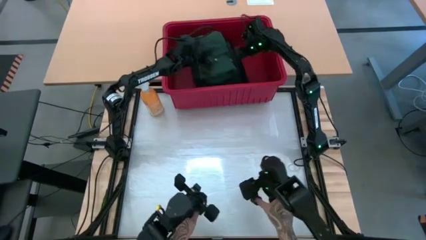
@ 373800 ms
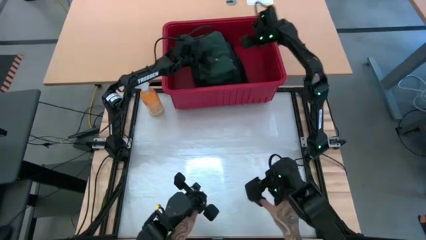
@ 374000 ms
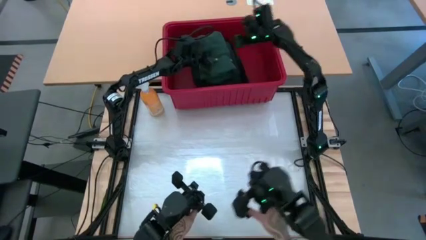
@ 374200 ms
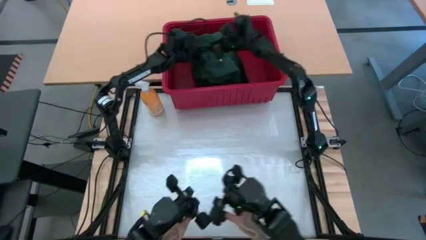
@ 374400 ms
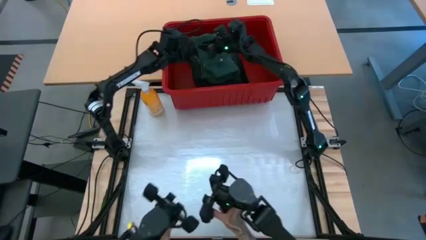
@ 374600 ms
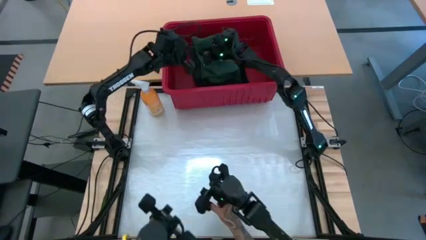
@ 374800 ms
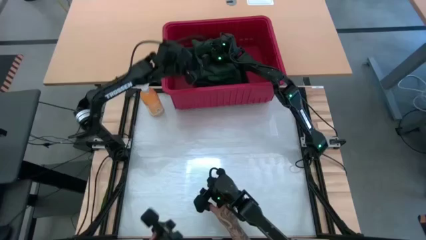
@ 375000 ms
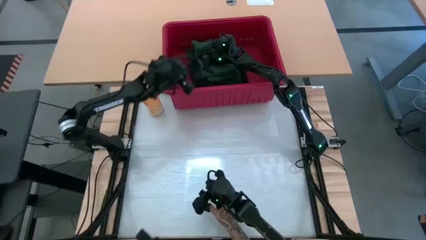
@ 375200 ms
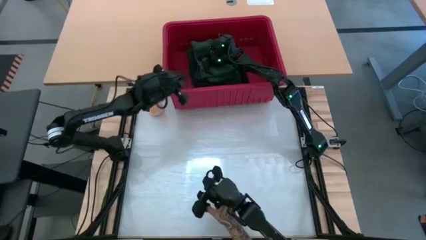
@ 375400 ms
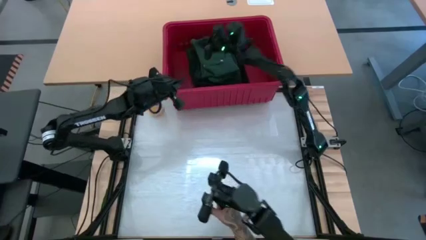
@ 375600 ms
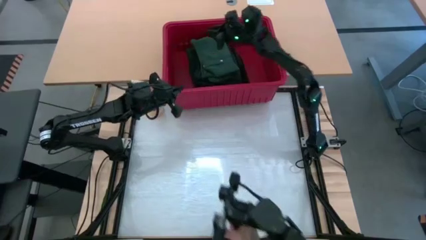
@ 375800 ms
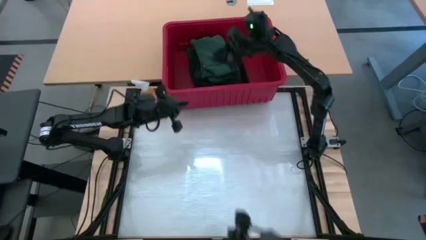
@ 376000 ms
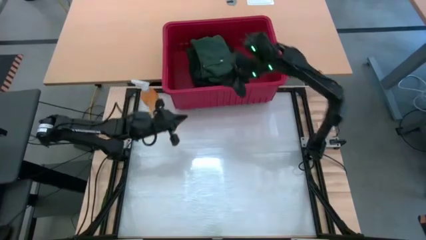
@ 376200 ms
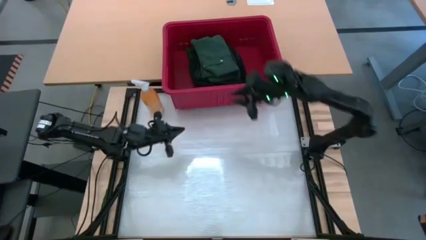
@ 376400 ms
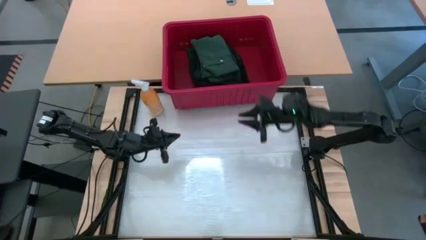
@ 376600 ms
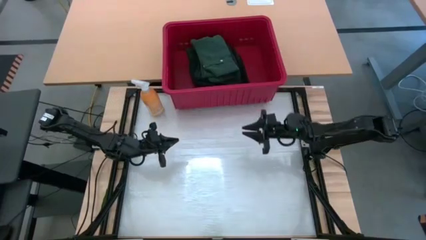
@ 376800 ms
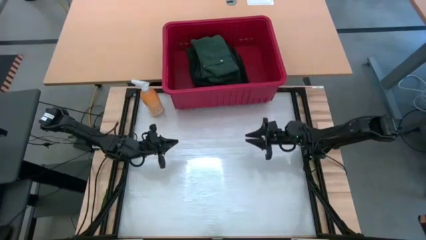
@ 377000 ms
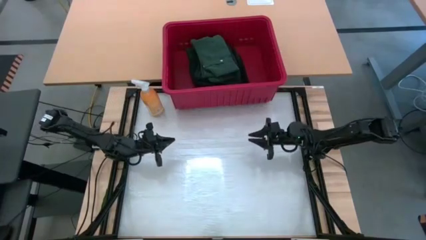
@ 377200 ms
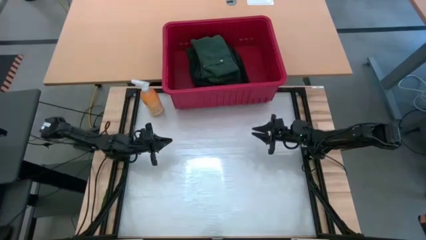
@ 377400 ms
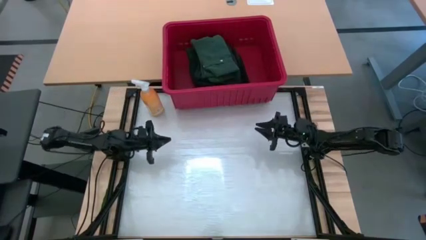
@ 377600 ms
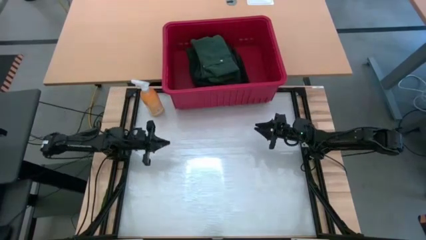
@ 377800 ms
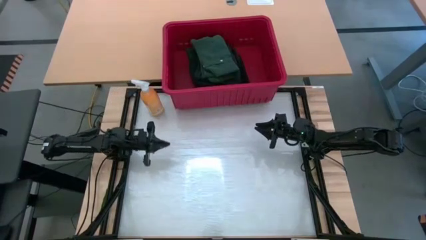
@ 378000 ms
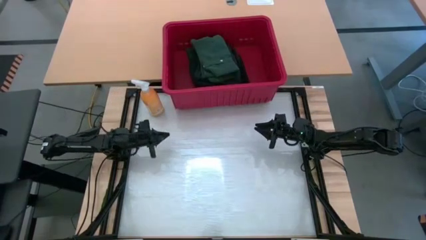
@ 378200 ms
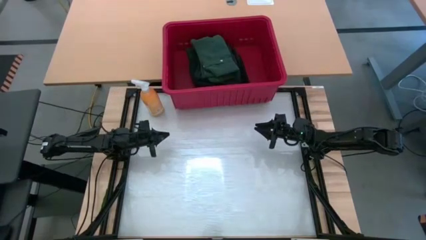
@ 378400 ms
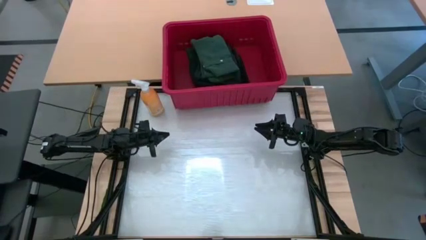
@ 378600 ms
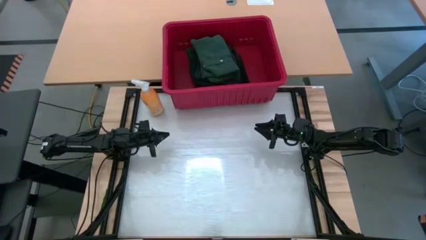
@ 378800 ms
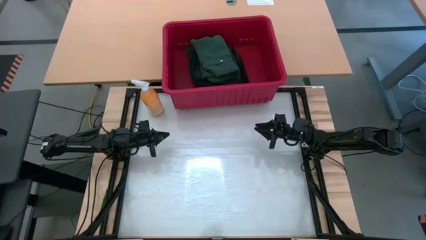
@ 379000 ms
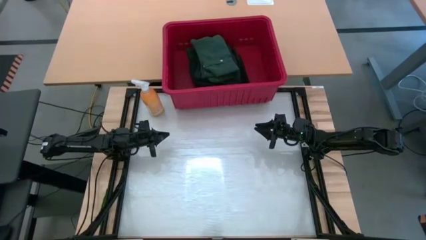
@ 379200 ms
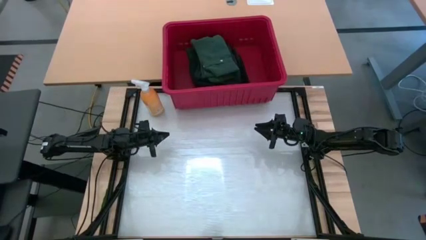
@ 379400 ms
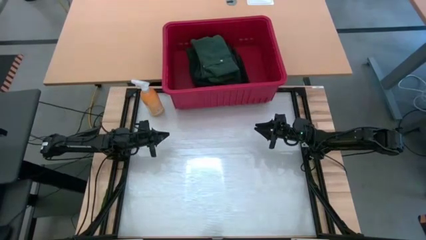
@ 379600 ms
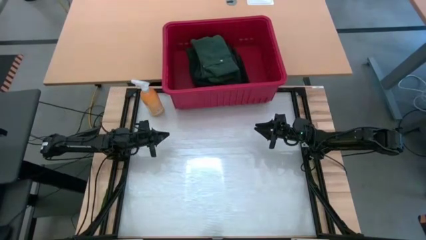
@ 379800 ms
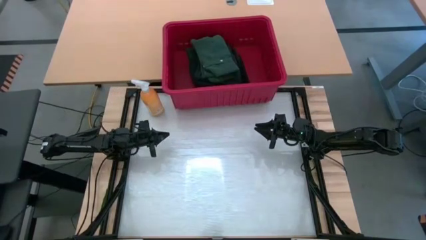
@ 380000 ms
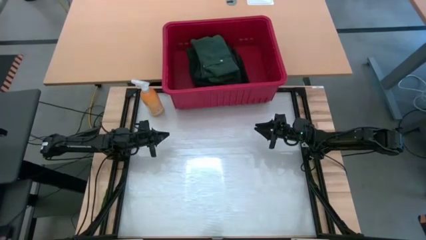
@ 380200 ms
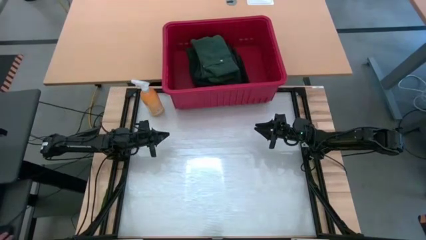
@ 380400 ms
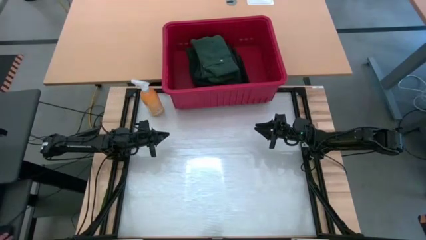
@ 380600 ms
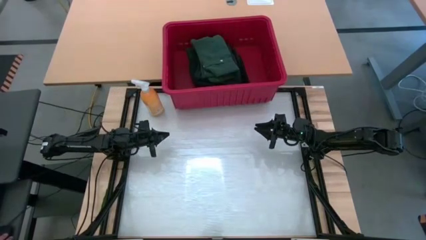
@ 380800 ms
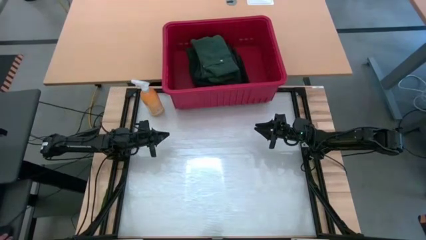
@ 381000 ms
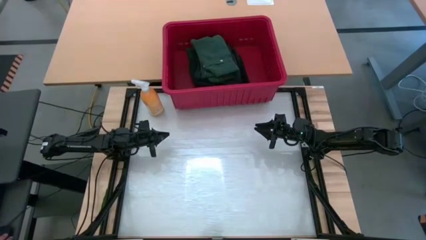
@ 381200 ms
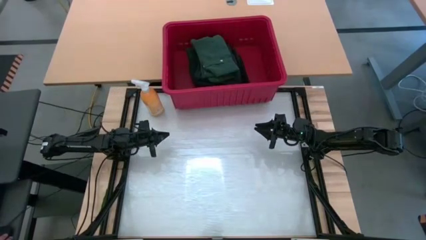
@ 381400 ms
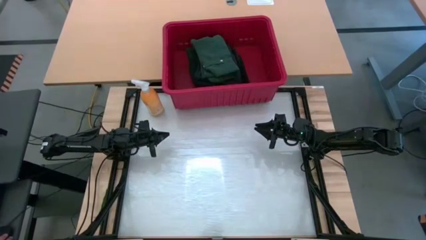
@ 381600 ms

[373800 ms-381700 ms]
Task: Fold Laundry from Bin
Return to Home Position

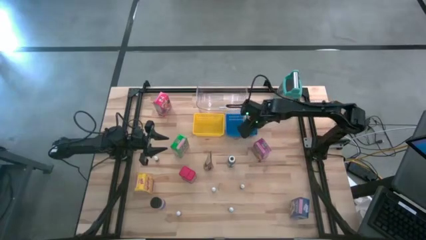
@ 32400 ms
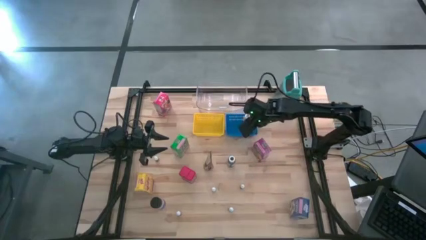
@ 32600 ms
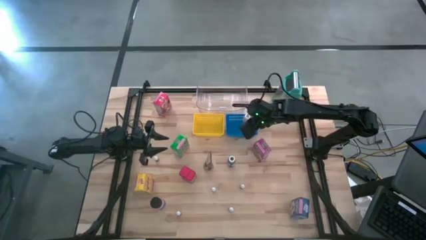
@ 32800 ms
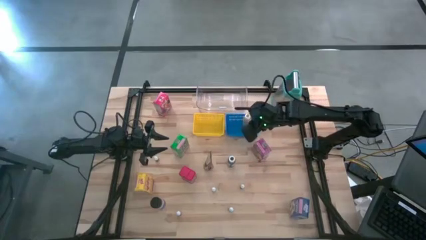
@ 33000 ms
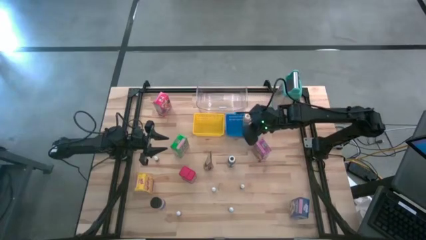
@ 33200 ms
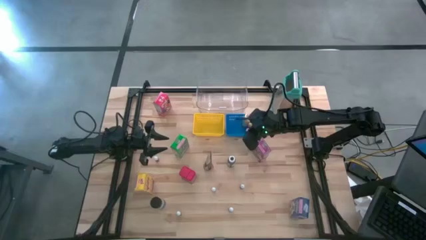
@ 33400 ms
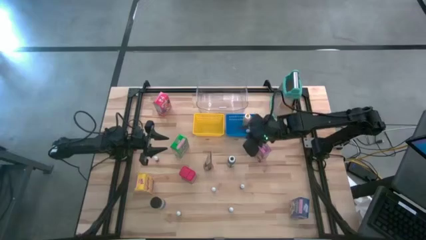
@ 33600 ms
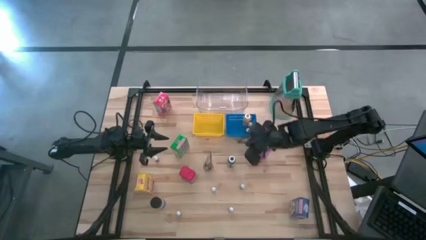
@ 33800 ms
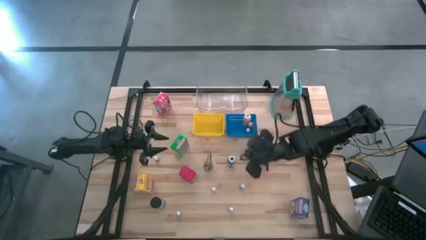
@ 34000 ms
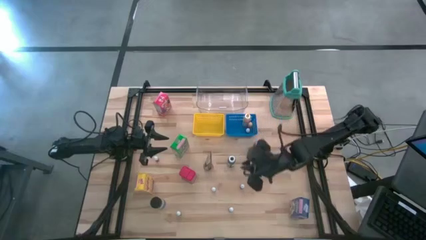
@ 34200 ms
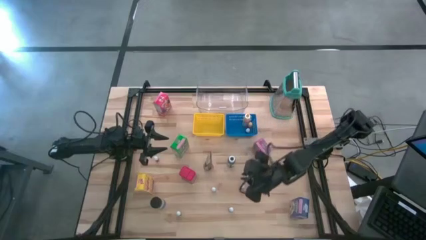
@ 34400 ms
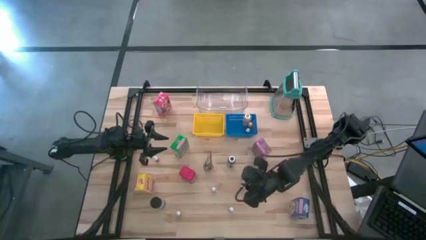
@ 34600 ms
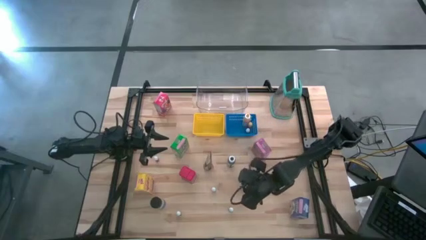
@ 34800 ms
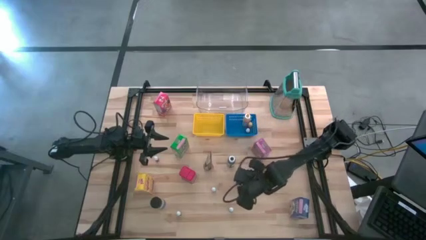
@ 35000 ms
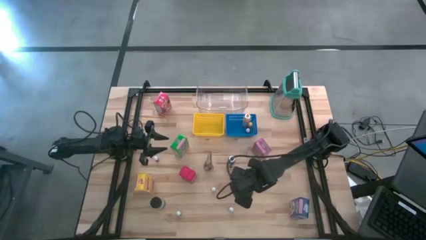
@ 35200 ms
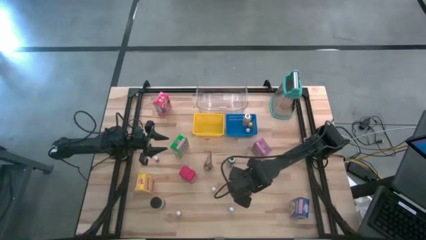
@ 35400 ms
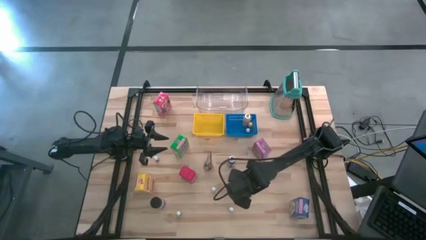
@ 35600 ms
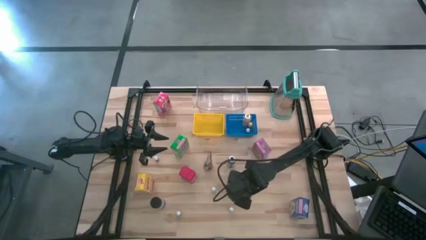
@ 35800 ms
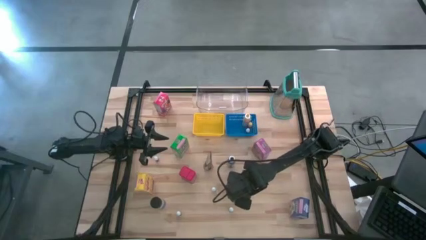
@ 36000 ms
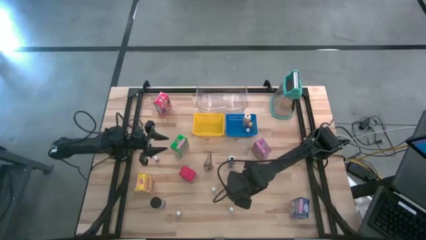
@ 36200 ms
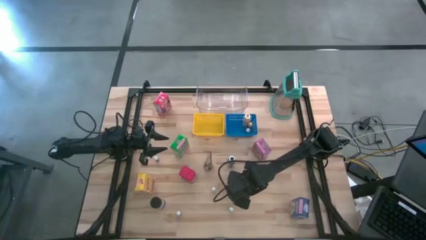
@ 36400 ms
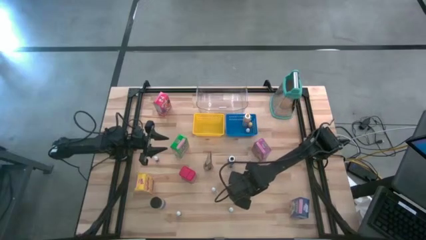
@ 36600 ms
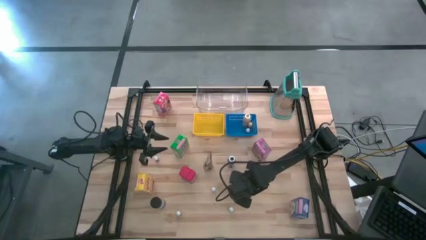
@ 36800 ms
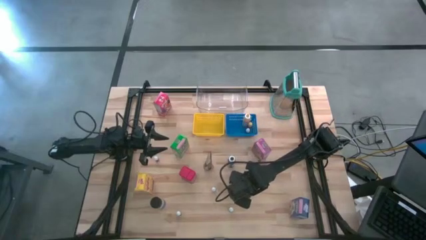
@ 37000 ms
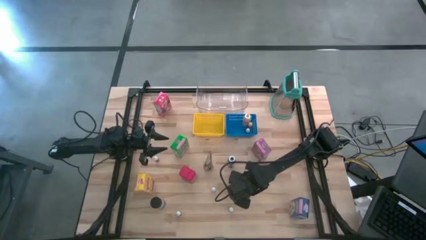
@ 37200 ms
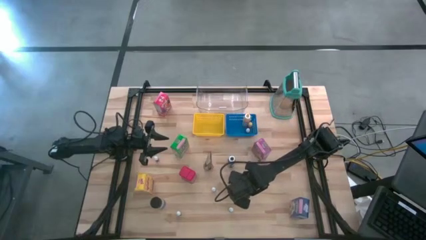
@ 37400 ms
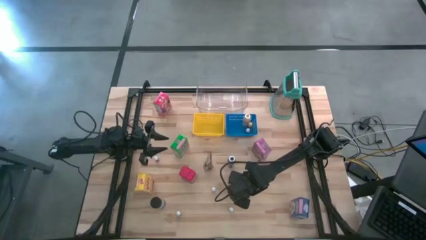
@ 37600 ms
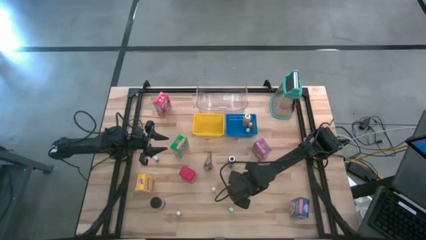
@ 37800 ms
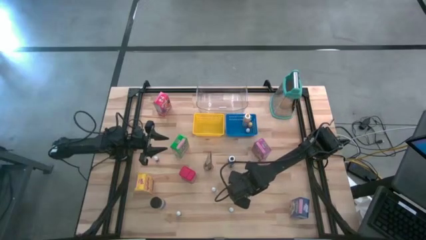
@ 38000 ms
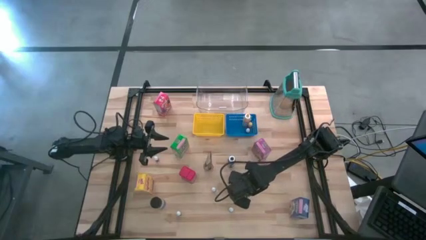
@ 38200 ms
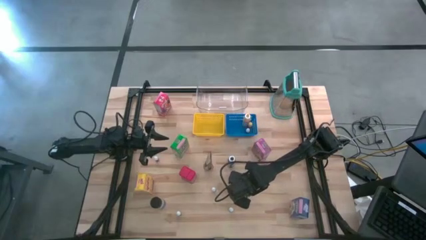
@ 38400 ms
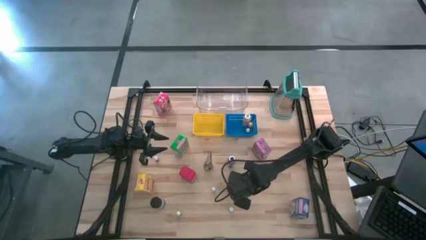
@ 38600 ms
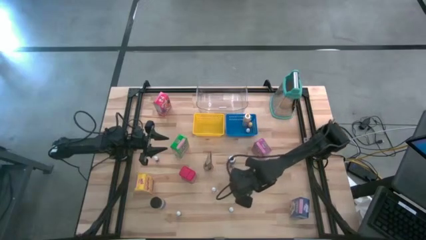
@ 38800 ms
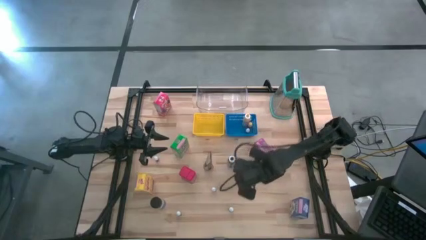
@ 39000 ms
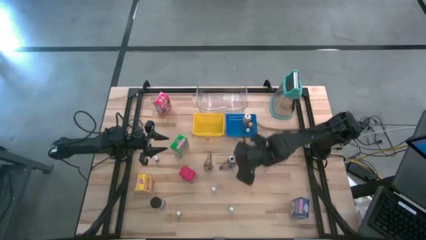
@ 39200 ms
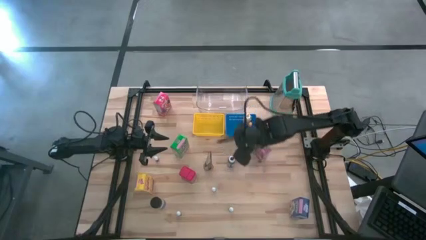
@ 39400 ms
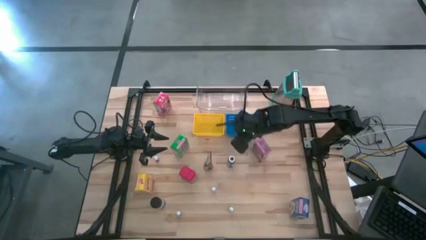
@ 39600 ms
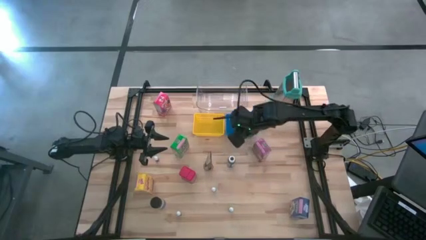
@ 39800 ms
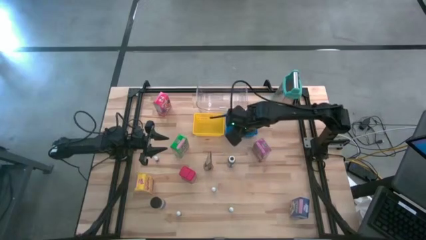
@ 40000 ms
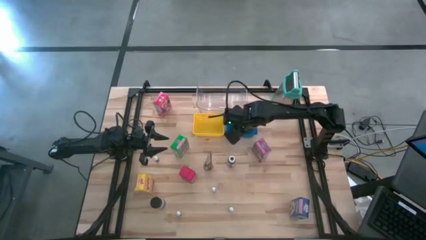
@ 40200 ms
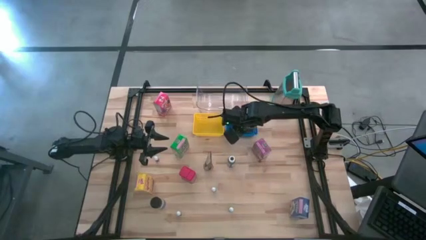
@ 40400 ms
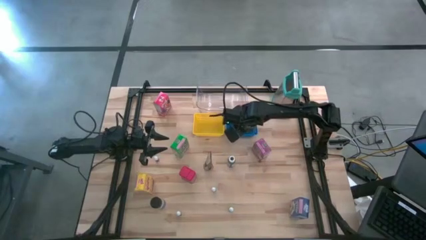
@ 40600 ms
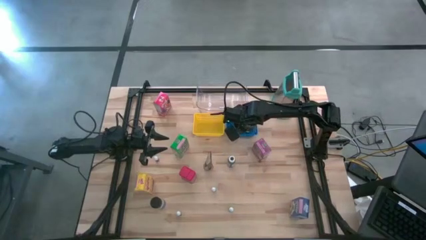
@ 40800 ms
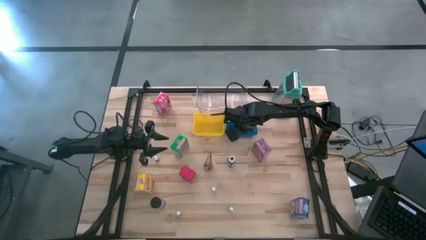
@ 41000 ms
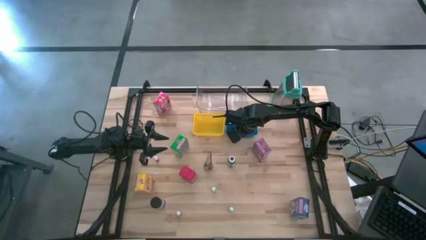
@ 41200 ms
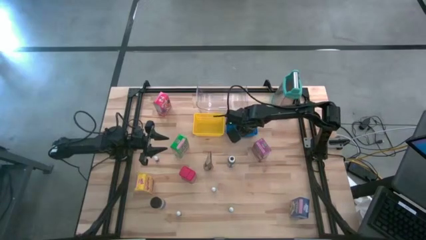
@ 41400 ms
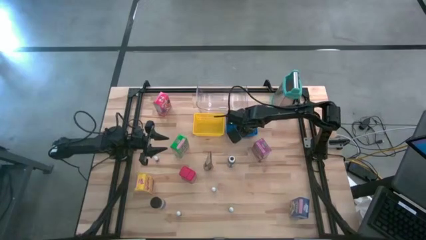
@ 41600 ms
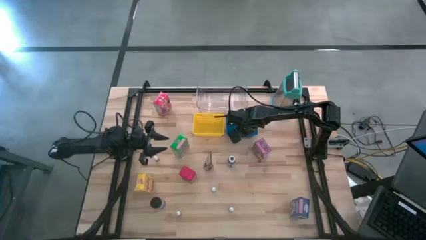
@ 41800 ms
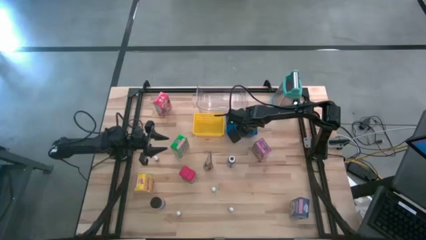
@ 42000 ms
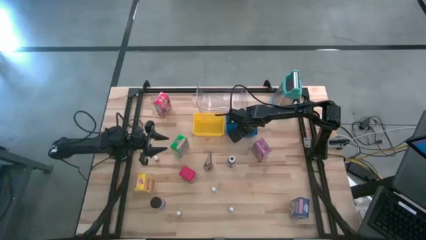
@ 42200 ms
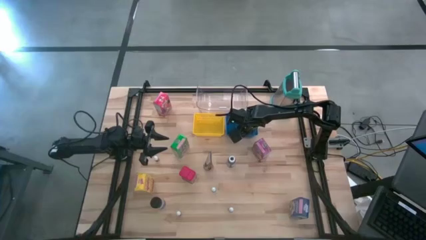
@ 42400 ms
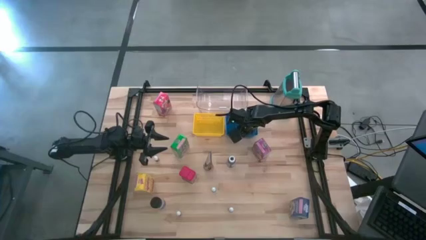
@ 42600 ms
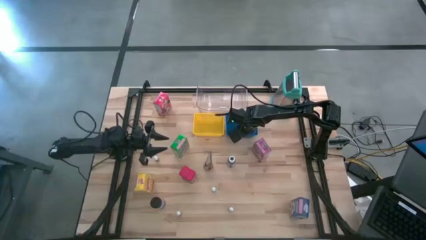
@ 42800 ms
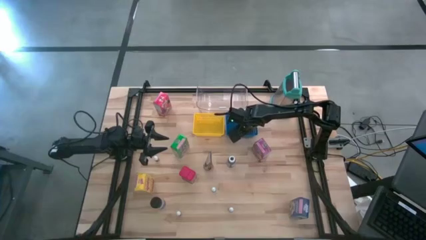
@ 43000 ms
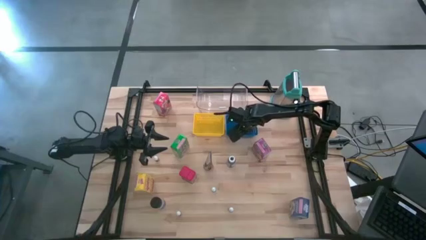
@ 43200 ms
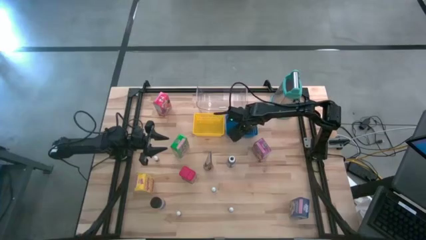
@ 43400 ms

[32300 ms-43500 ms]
Task: Pick & Place Kitchen Items
Put the blue food coloring bottle into the blue bin
